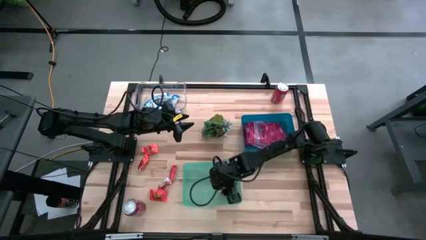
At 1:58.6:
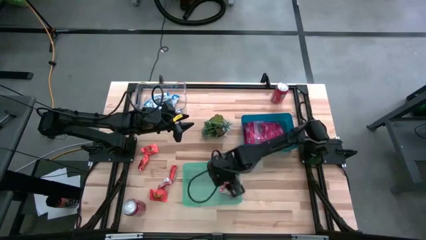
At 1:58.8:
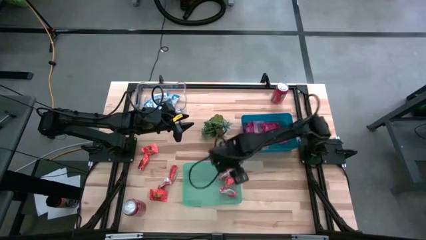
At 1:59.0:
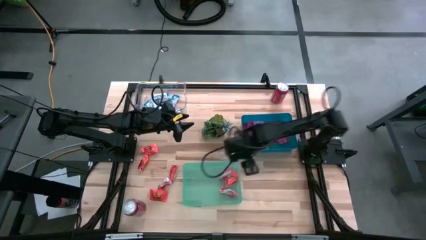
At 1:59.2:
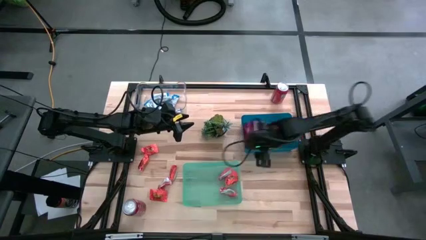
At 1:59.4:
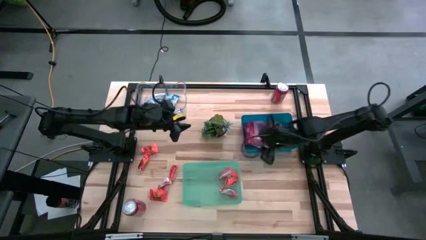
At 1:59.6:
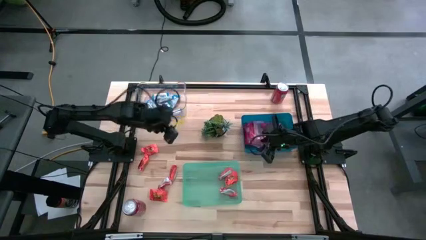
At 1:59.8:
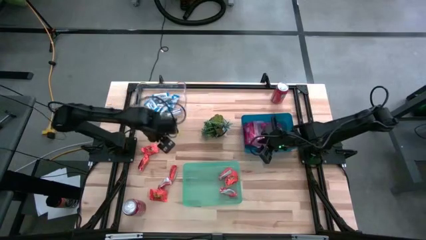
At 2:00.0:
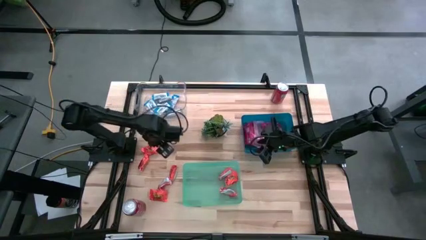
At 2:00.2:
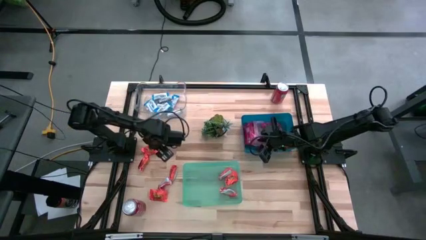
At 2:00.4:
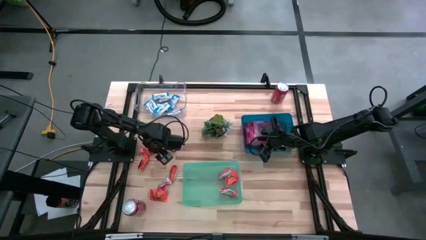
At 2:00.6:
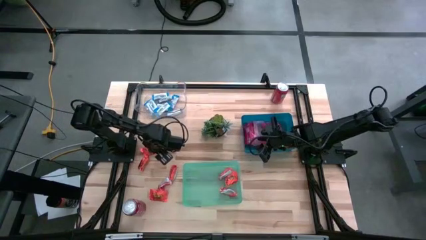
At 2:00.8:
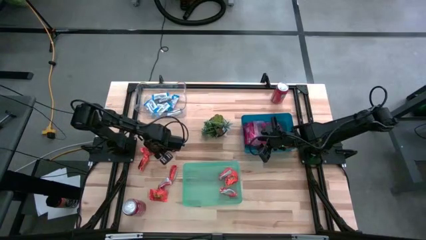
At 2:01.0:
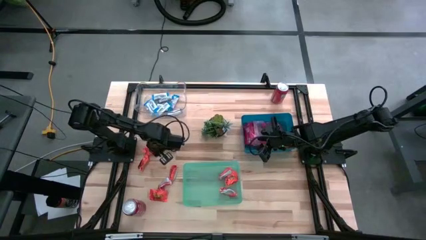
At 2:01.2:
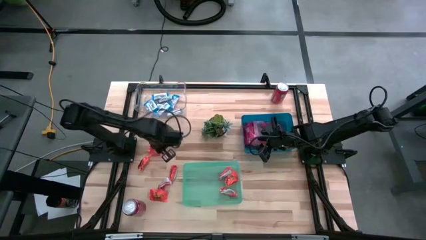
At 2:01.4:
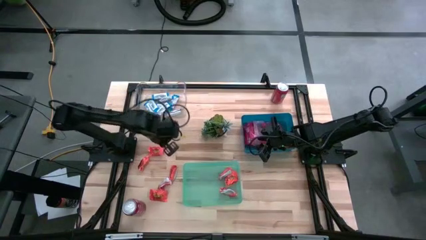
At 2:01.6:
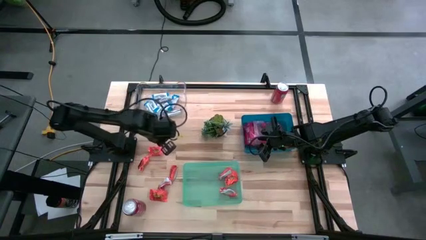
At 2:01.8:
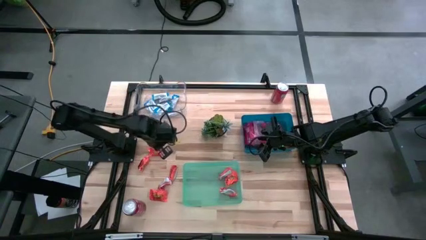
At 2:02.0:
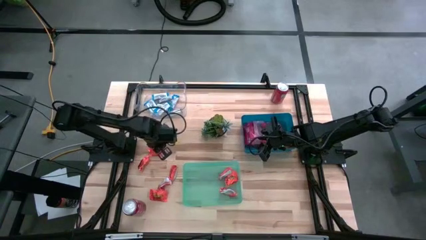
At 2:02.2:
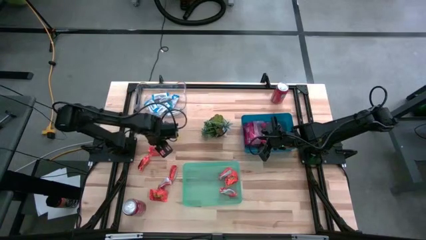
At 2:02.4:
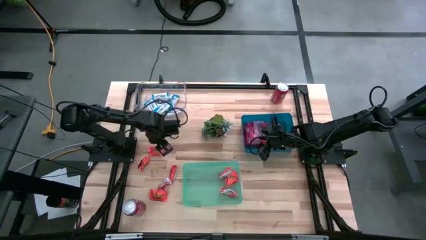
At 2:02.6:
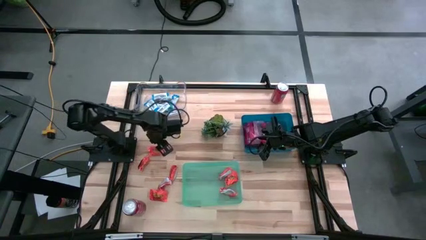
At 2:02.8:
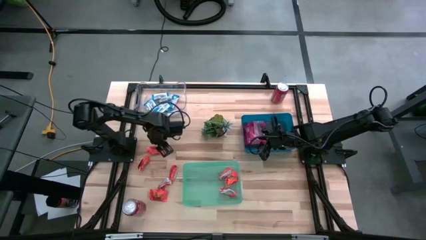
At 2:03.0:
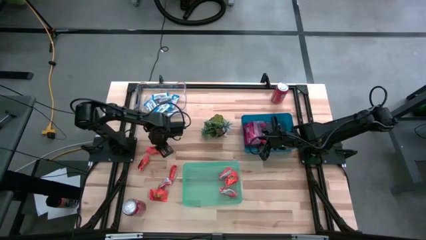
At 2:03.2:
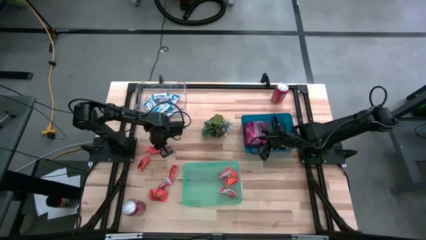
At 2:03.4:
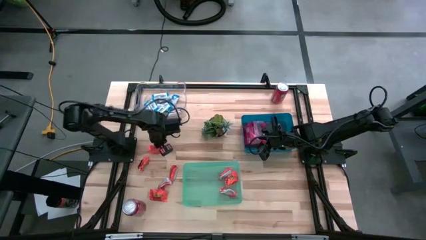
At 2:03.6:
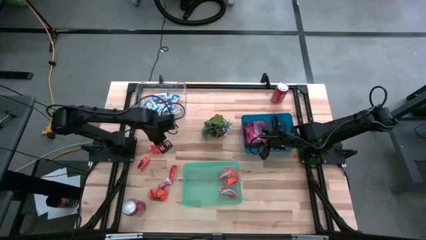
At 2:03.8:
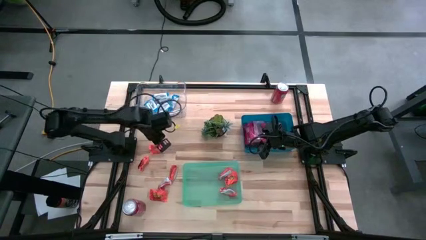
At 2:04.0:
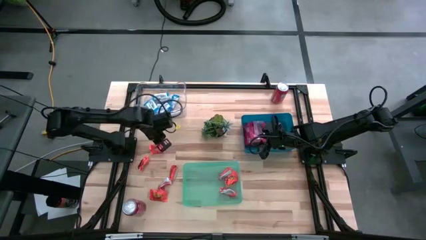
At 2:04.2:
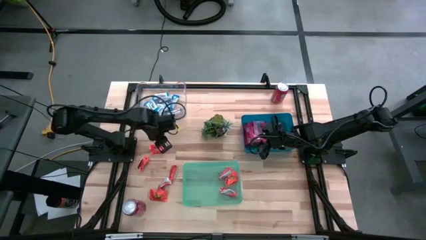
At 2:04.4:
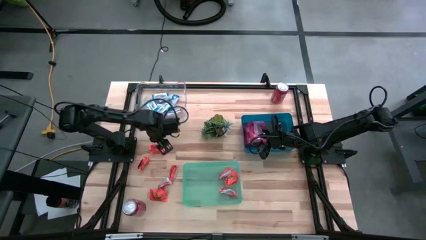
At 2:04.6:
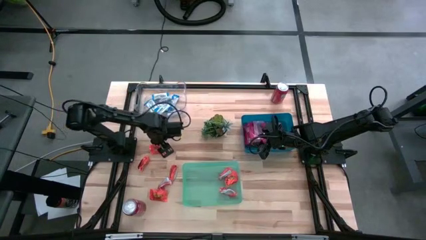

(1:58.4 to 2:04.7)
Task: Sort candy
Put the orange candy into the green transparent bin

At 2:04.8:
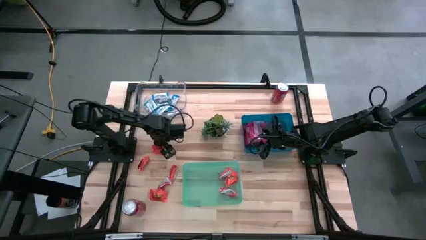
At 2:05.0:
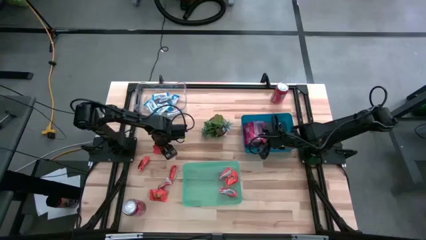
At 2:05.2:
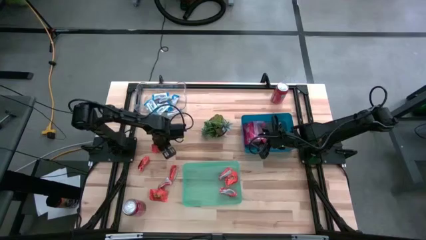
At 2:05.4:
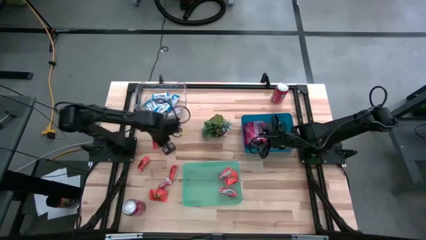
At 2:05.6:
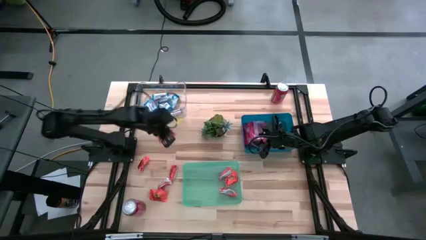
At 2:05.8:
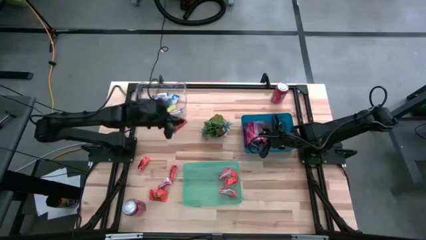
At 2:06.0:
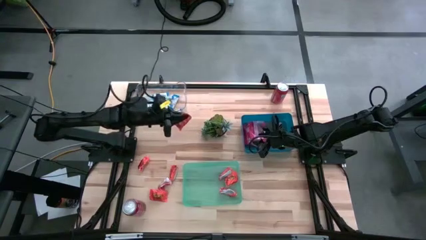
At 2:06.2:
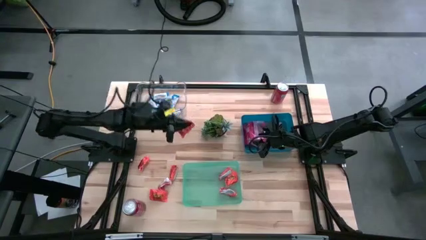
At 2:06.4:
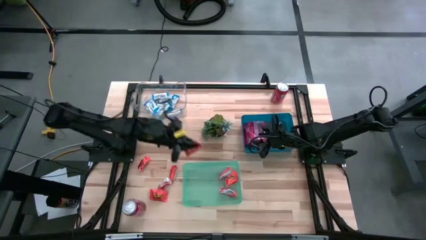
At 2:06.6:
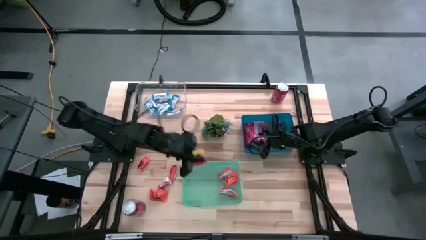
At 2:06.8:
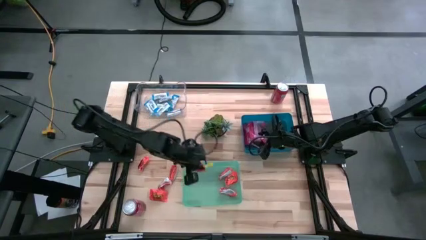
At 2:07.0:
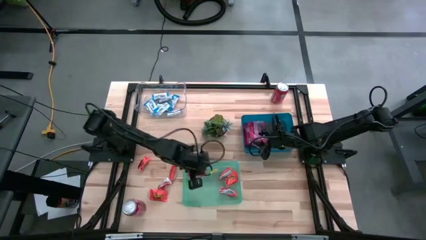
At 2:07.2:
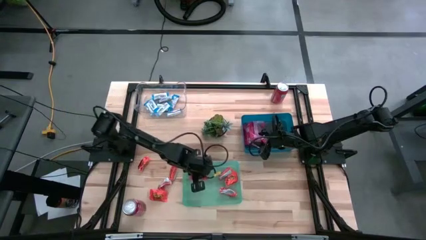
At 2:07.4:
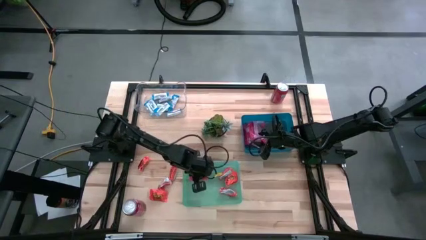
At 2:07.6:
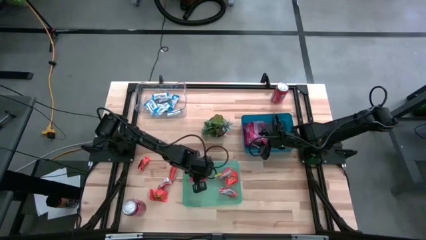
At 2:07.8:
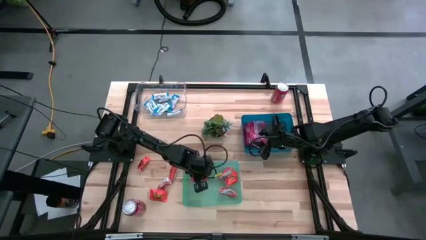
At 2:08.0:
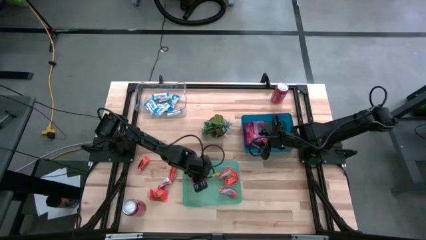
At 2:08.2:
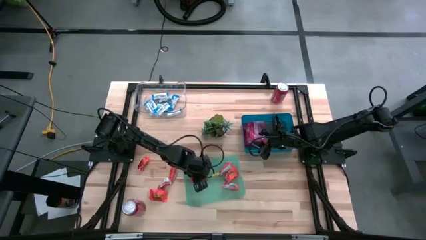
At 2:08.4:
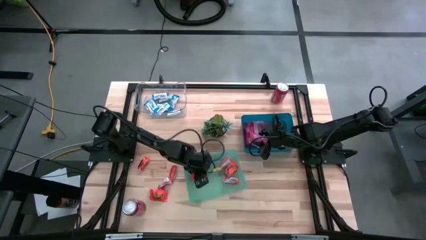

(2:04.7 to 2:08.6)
Put the orange candy into the green transparent bin

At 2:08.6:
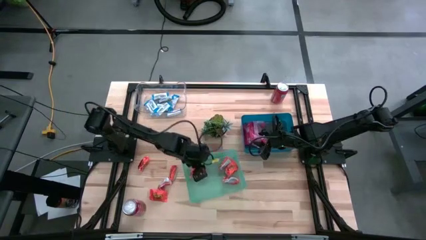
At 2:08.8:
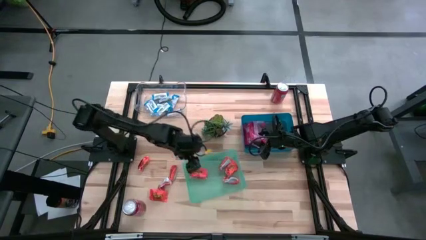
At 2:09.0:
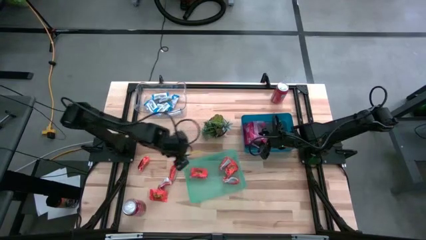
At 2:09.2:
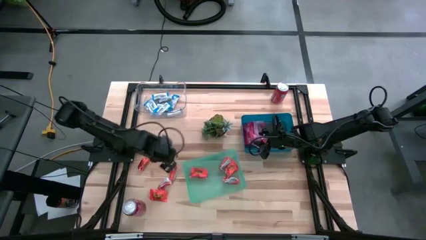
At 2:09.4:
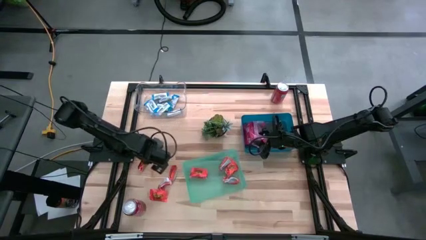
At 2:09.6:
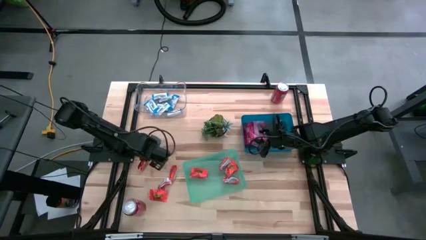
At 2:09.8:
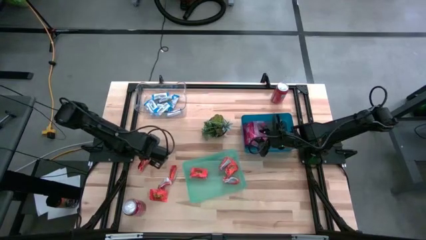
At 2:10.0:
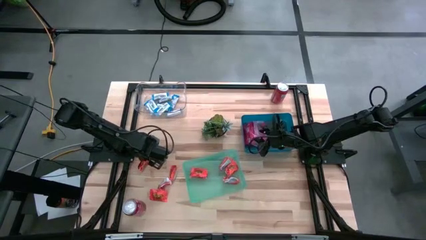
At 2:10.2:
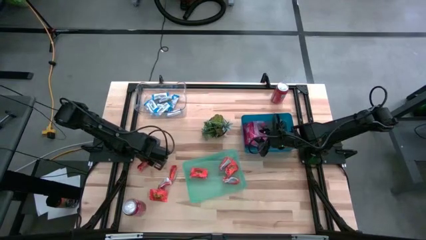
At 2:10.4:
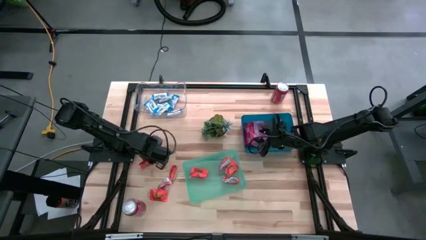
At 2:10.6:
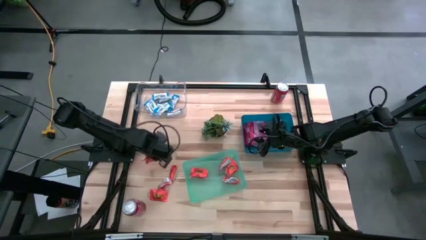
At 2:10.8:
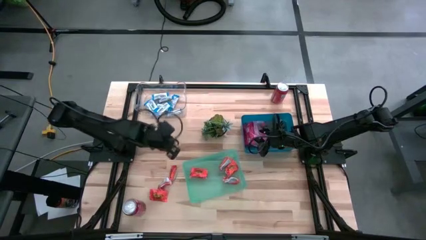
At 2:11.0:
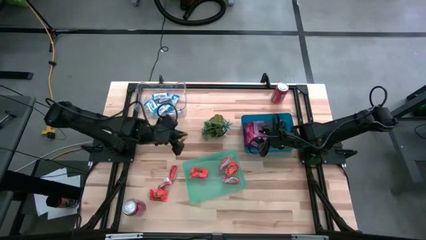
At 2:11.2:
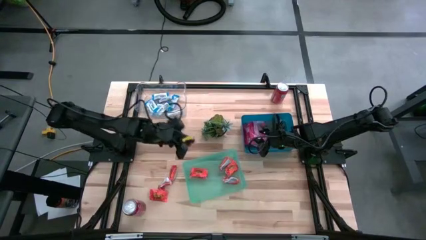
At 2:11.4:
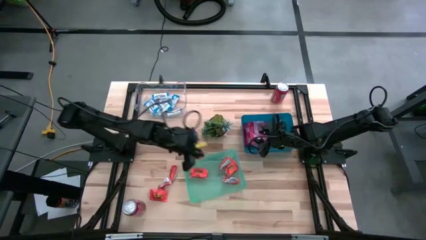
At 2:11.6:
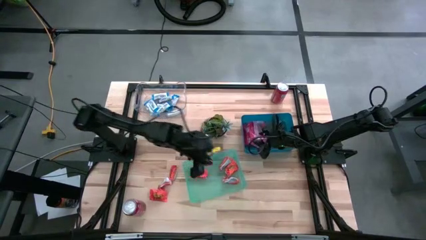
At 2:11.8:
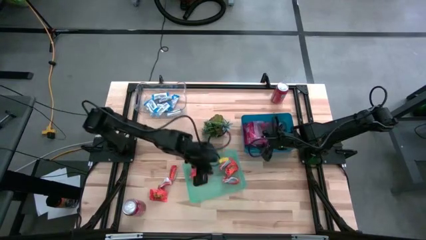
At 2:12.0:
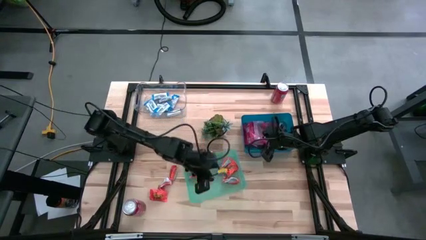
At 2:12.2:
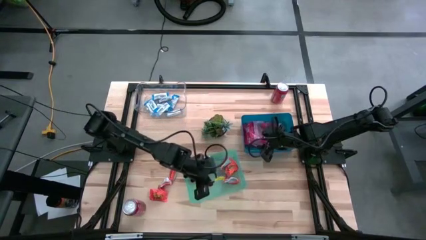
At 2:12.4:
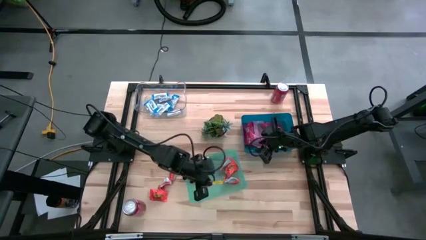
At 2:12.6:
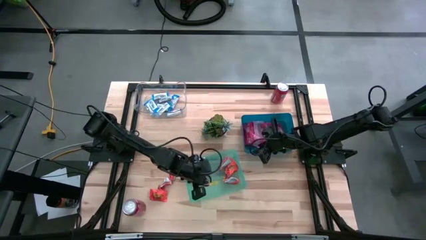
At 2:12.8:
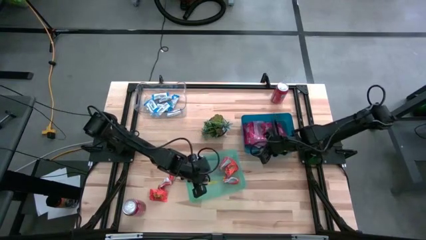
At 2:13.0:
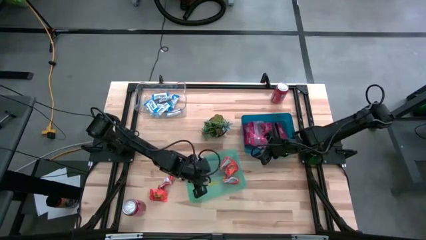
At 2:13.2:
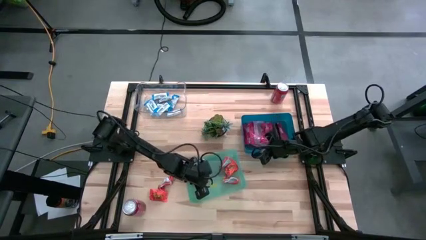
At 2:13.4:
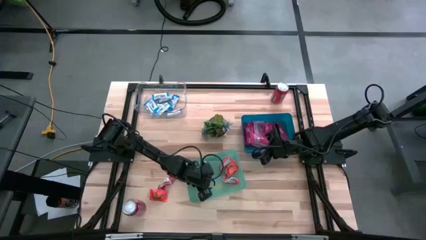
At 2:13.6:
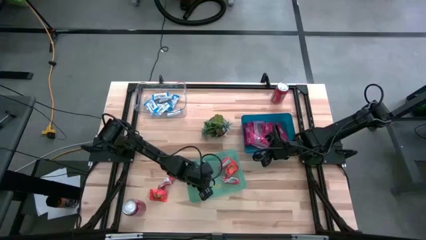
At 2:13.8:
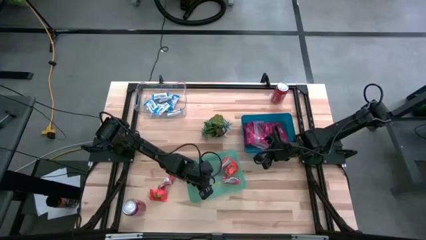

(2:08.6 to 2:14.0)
Put the orange candy into the green transparent bin

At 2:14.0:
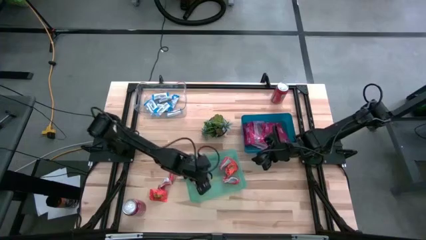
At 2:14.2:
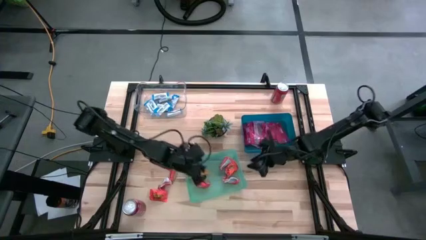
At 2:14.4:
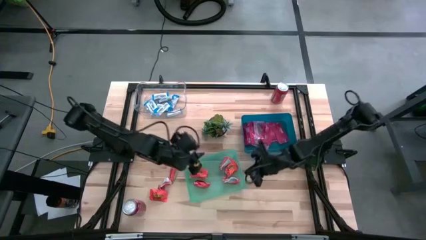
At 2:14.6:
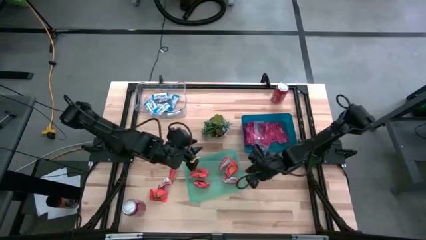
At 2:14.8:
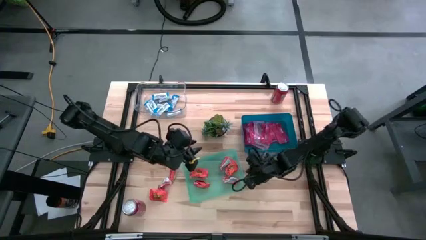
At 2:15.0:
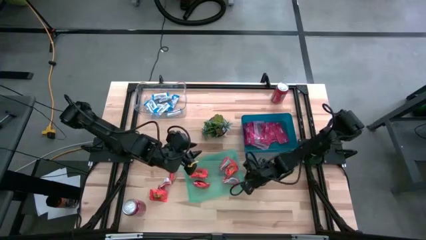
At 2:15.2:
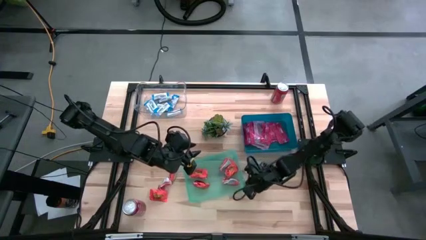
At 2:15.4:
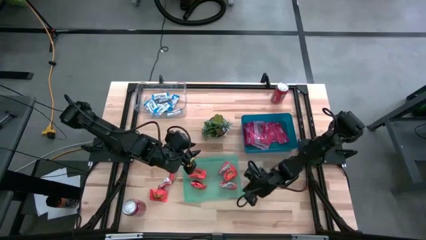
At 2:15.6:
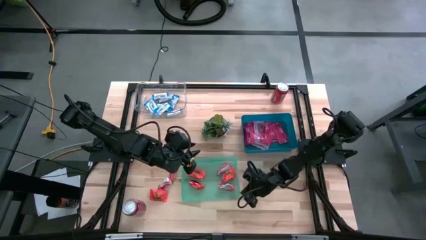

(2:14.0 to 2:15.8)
Adjust the green transparent bin
